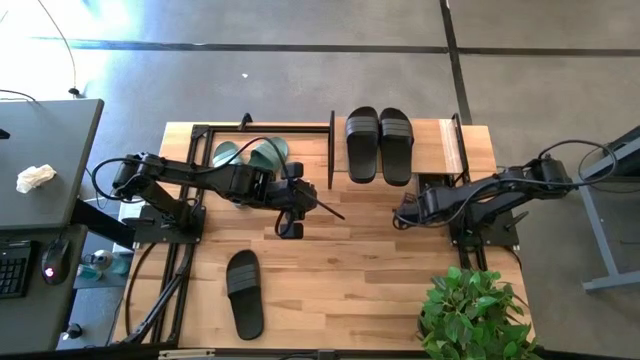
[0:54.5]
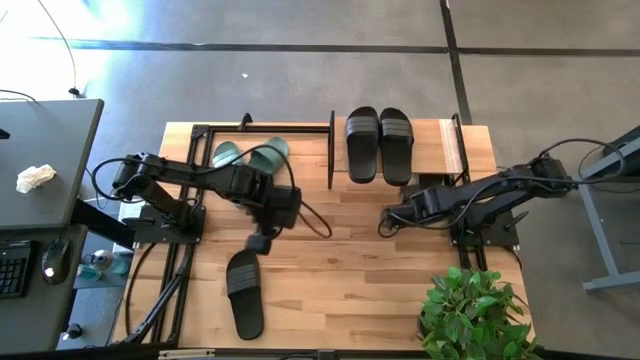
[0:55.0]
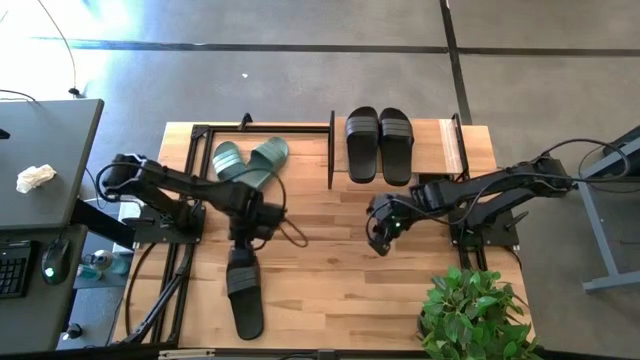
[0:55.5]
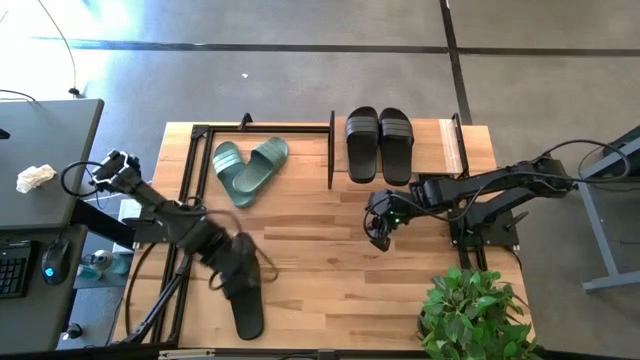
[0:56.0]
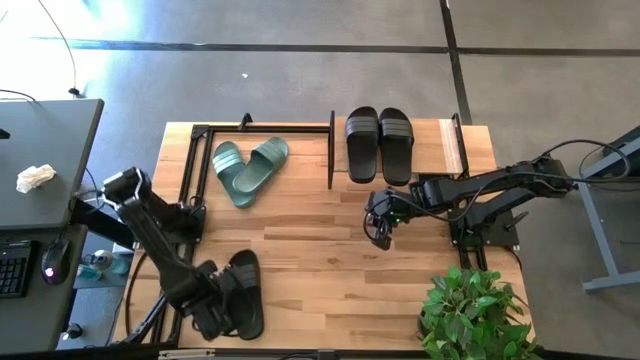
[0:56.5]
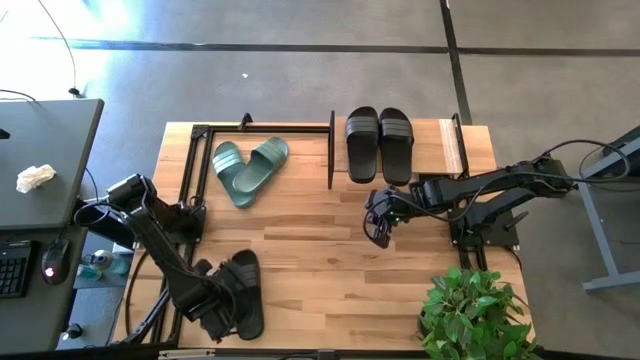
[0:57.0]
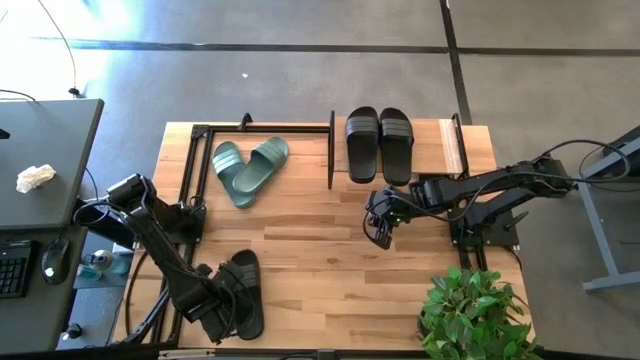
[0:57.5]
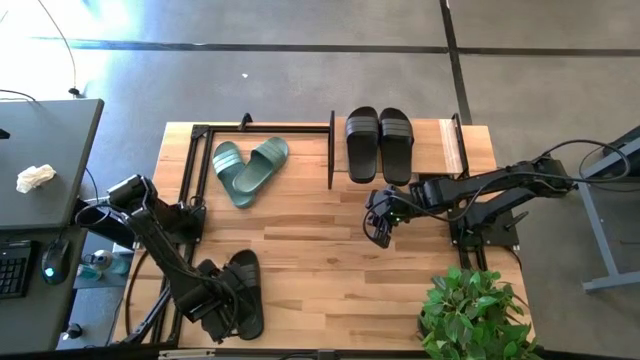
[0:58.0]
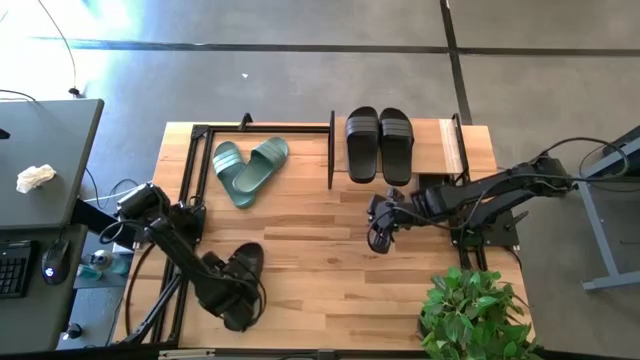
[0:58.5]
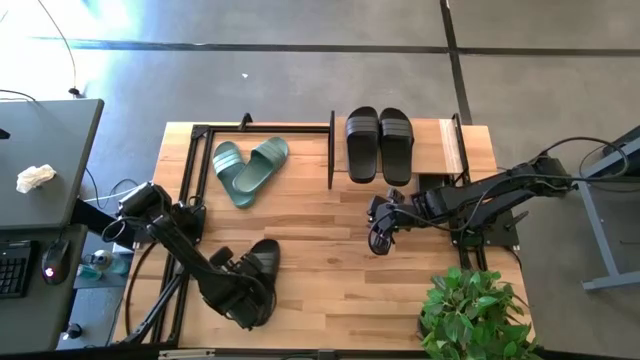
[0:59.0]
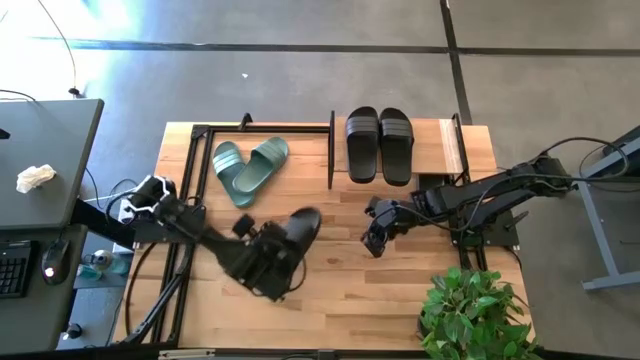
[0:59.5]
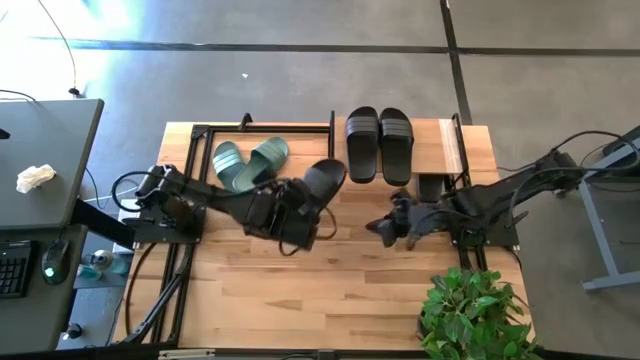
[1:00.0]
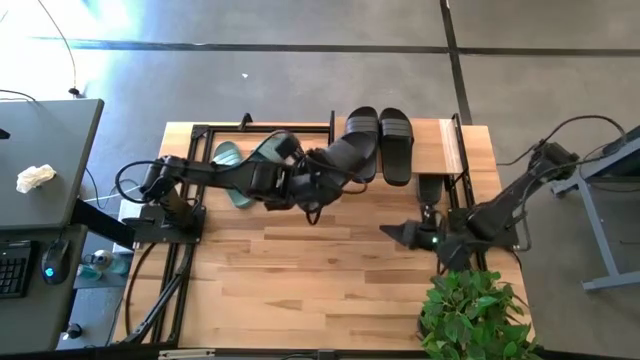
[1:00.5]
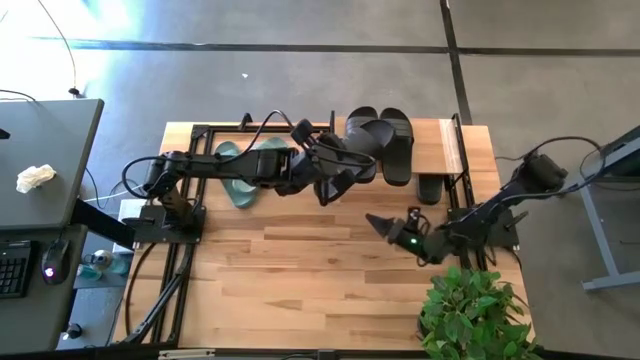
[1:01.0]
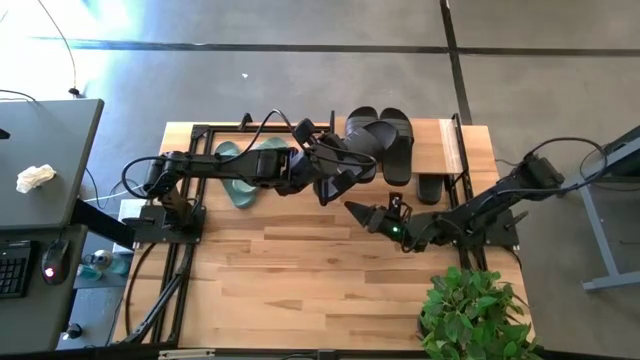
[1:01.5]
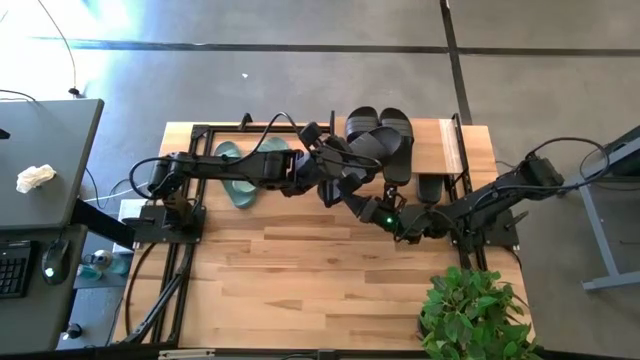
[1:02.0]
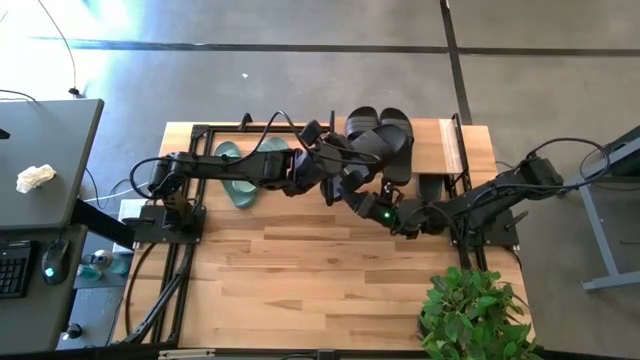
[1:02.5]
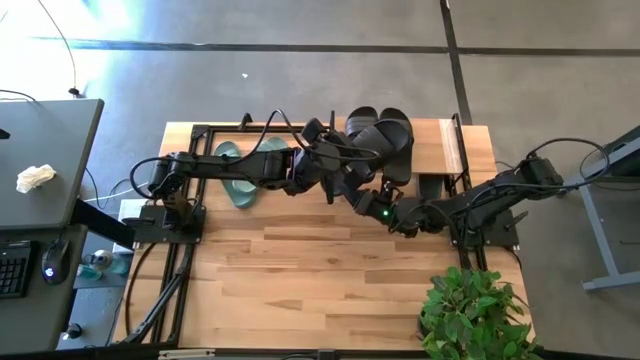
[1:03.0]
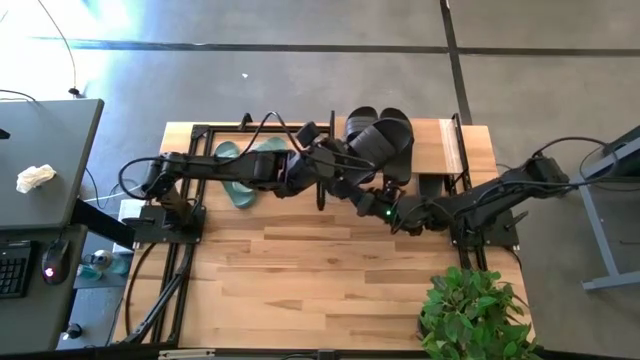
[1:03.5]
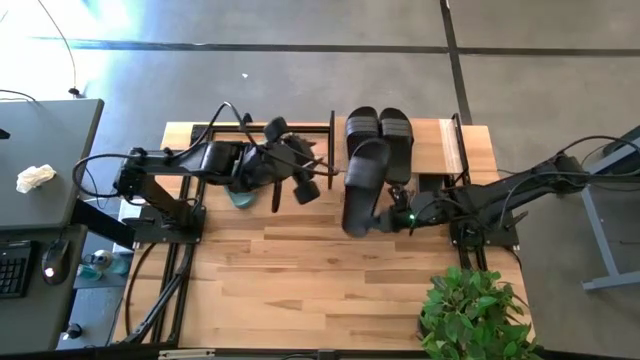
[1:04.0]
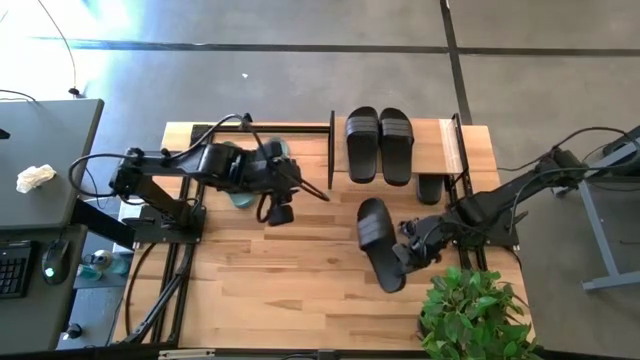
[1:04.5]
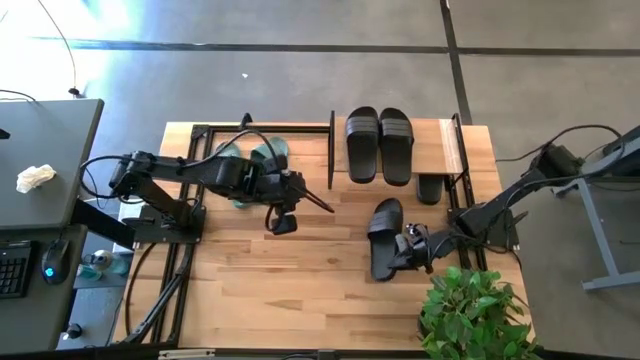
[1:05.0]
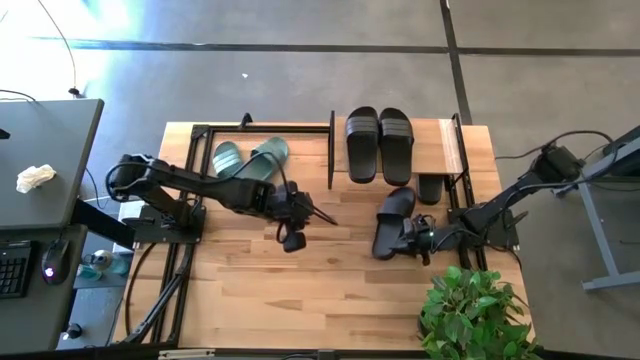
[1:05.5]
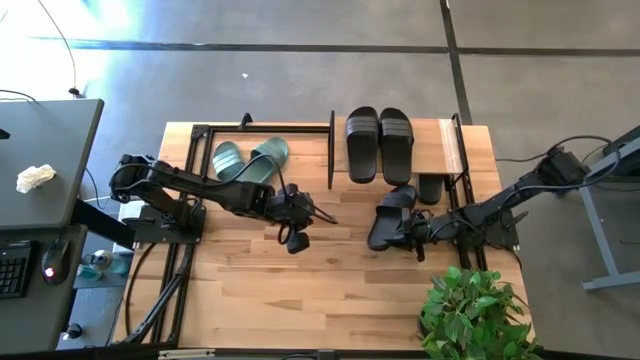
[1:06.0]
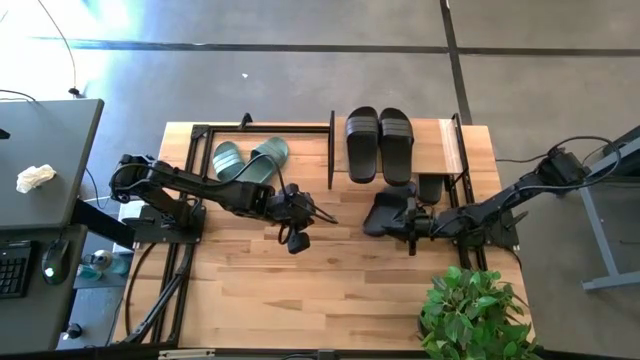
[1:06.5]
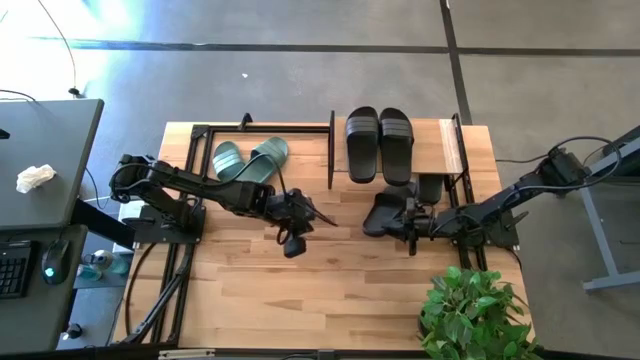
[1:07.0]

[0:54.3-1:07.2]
Task: Pick and place slides into the shelf
Put the black slipper under the shelf

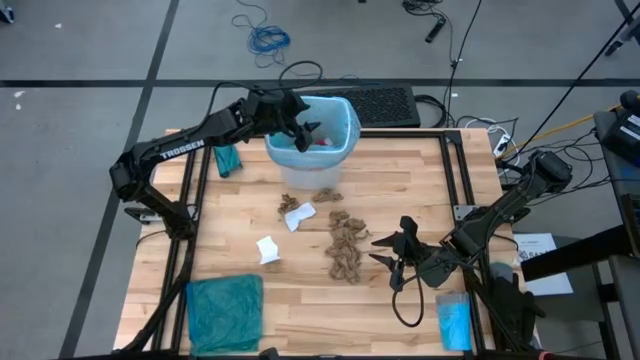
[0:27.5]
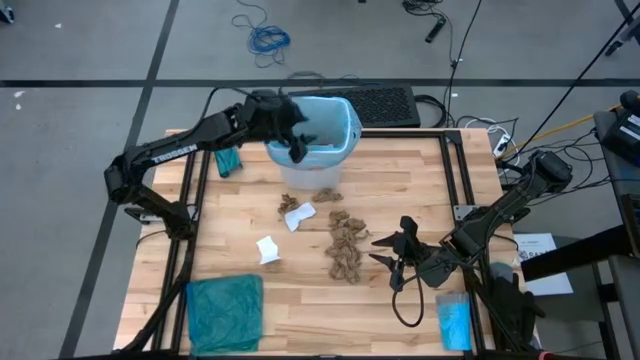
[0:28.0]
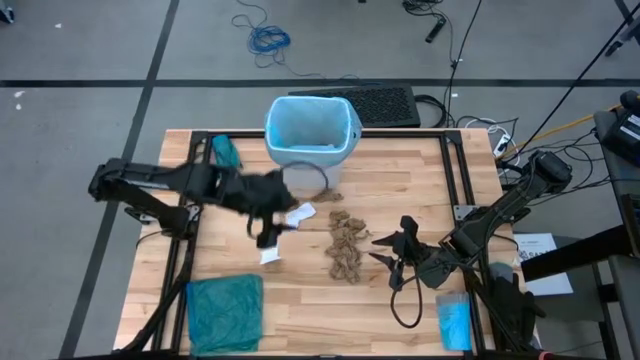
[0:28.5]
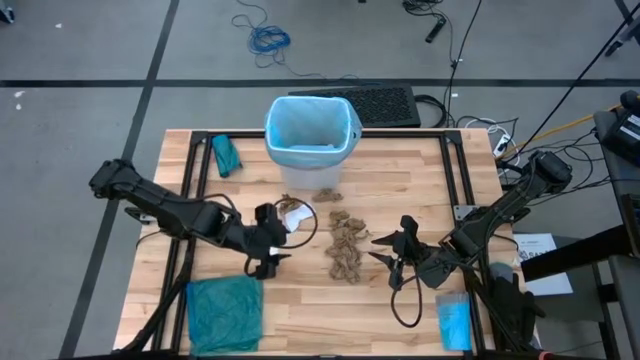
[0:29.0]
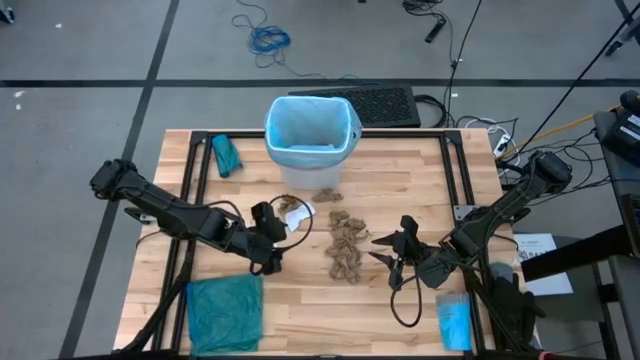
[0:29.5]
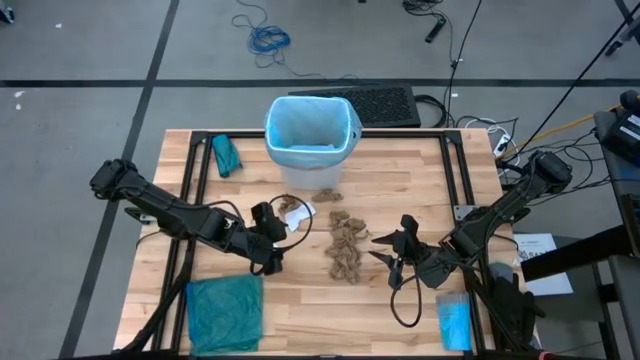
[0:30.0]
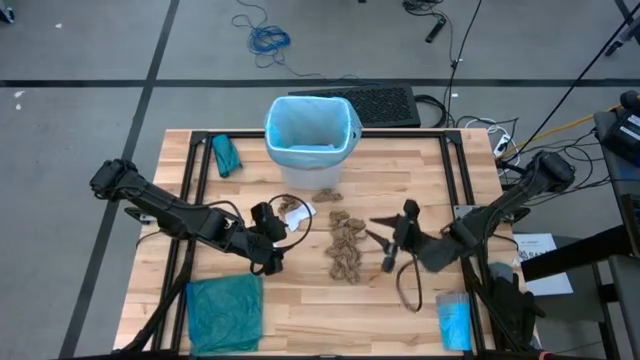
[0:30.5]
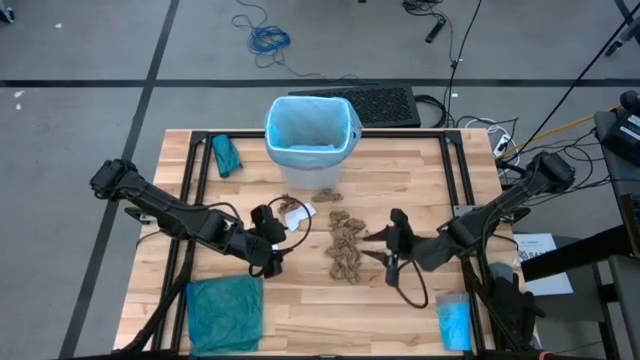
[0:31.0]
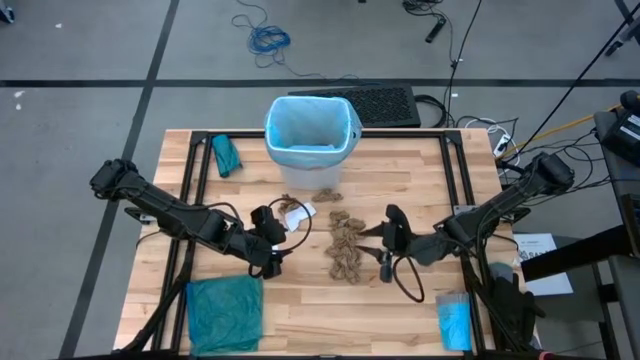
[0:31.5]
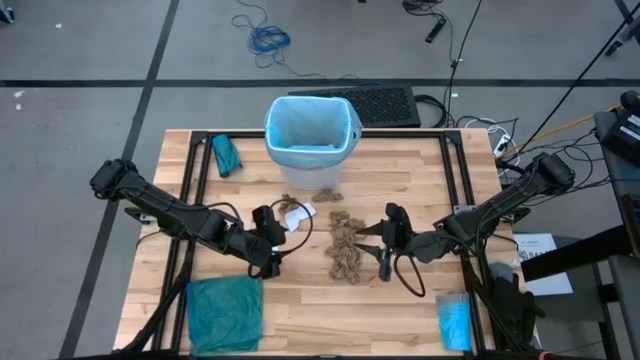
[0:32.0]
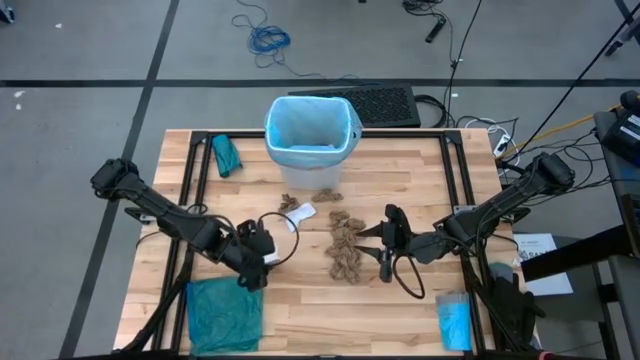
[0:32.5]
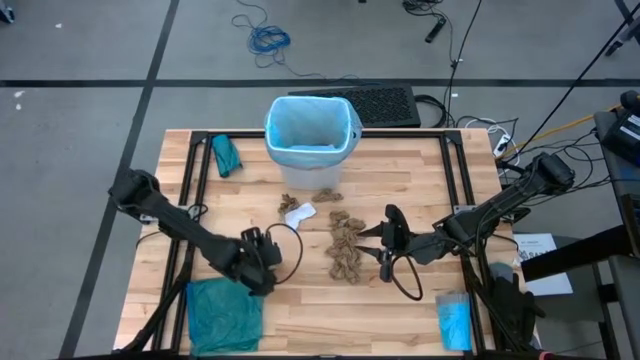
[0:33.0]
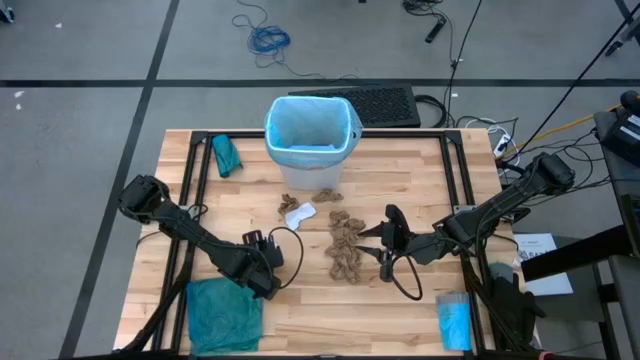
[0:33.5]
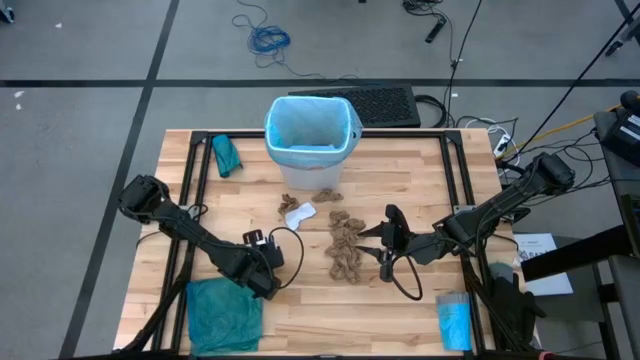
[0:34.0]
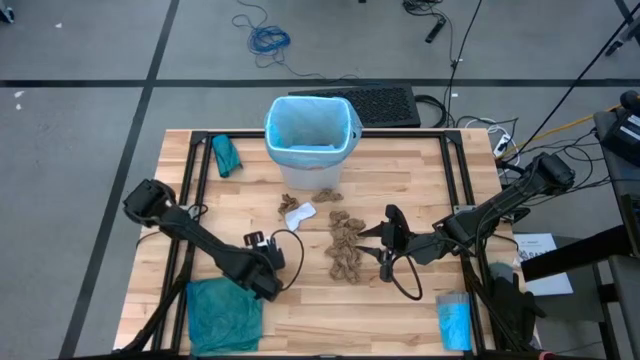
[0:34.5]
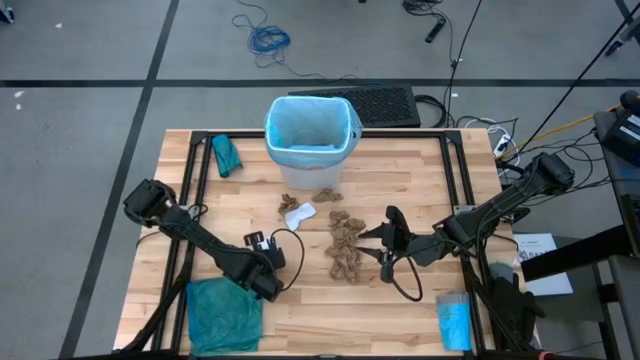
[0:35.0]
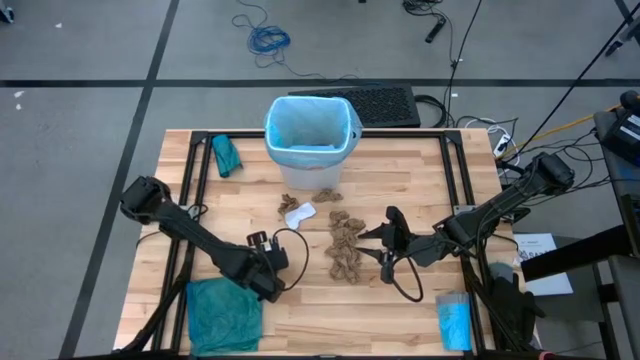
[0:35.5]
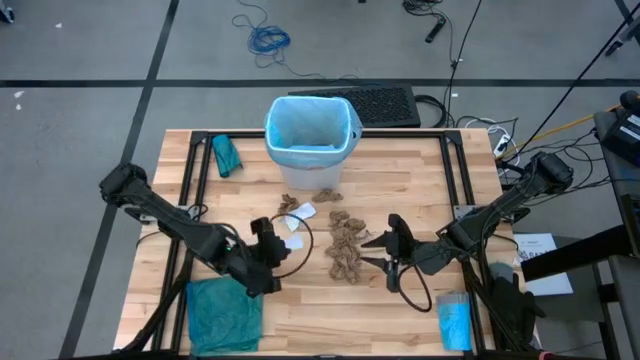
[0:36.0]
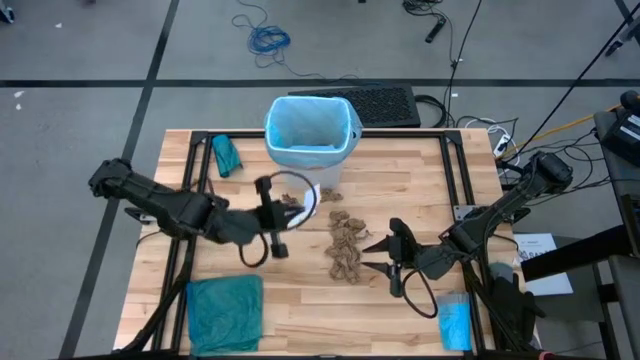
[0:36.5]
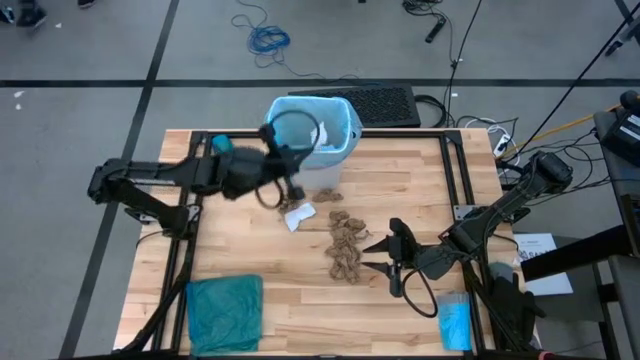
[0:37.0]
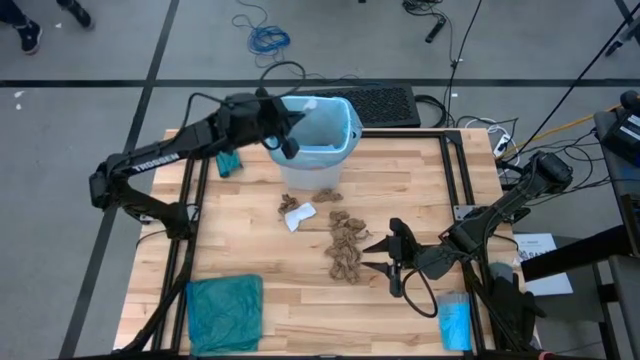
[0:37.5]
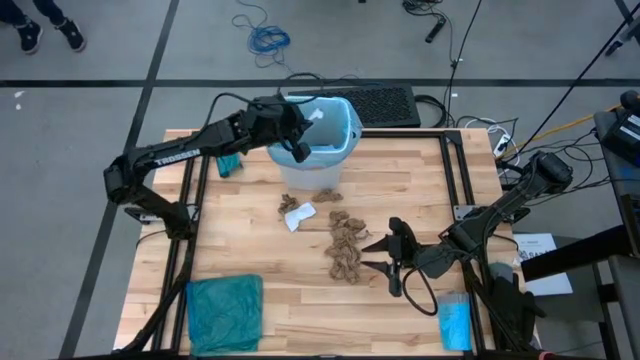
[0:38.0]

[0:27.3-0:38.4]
Task: place trash/remove bag and relplace
Put the white paper into the blue trash bag inside the white trash bin
